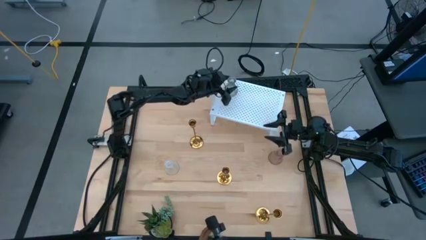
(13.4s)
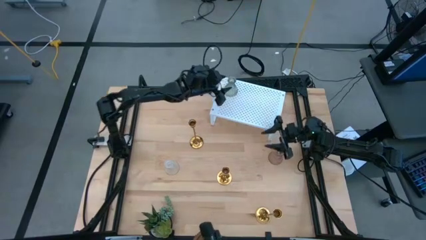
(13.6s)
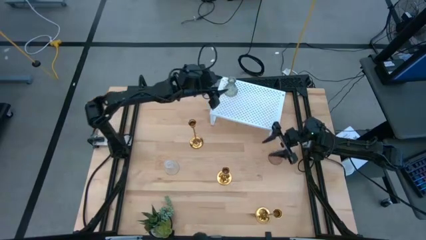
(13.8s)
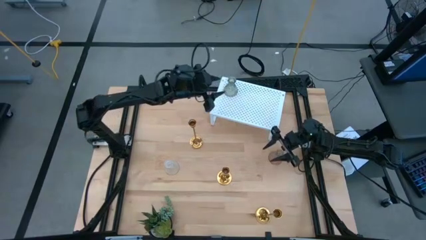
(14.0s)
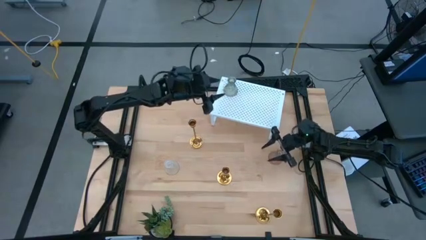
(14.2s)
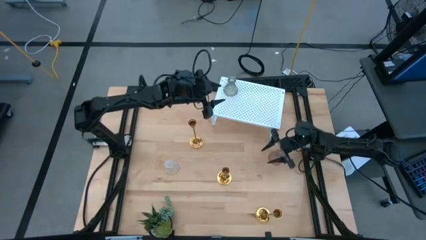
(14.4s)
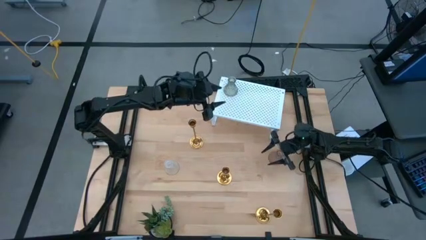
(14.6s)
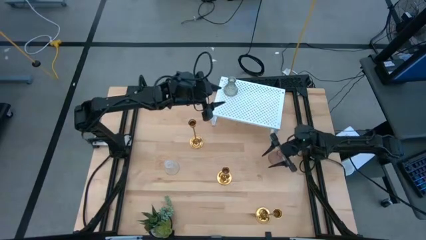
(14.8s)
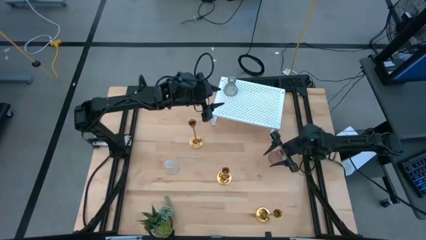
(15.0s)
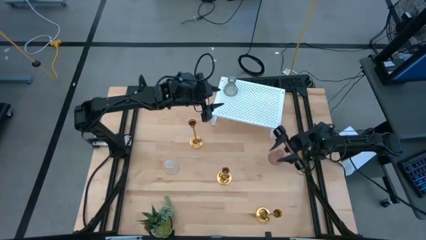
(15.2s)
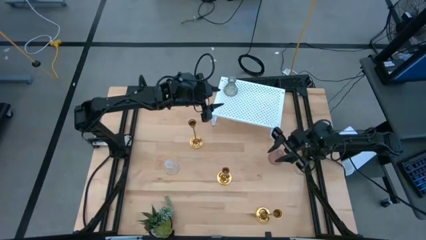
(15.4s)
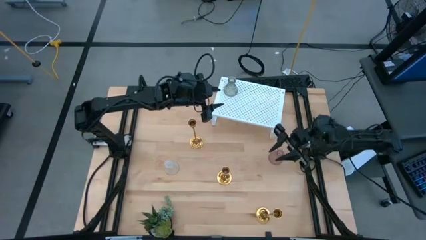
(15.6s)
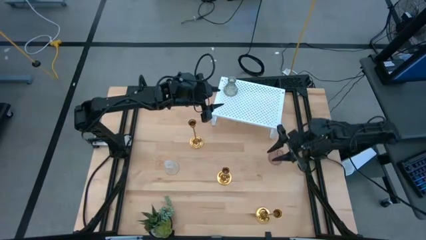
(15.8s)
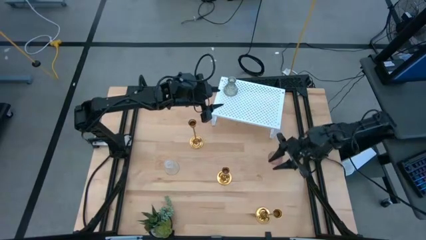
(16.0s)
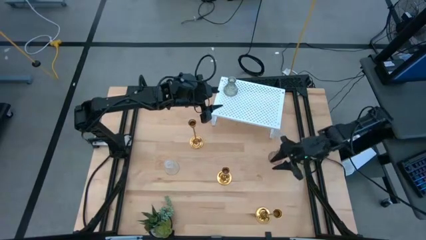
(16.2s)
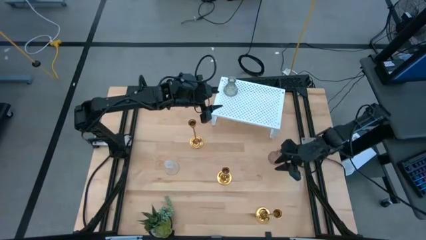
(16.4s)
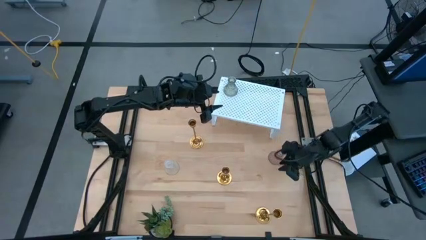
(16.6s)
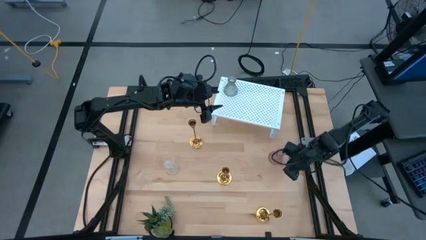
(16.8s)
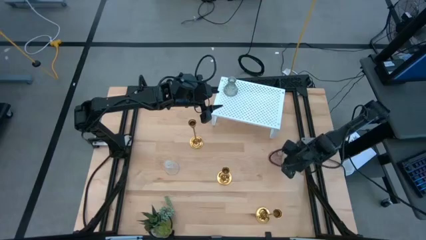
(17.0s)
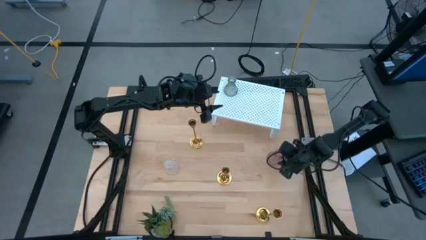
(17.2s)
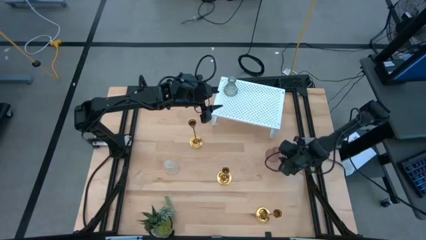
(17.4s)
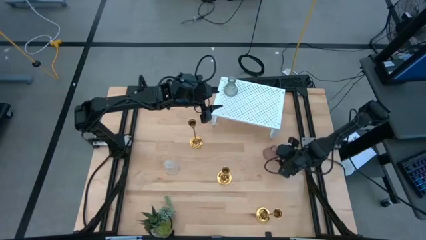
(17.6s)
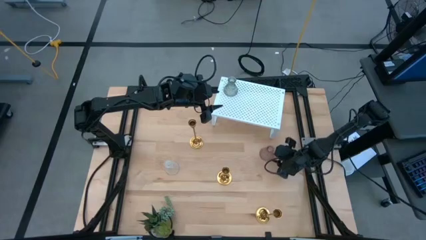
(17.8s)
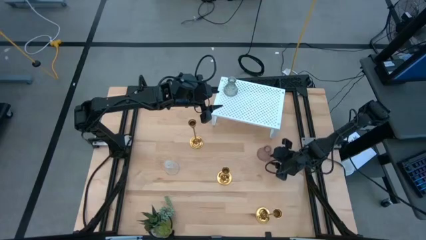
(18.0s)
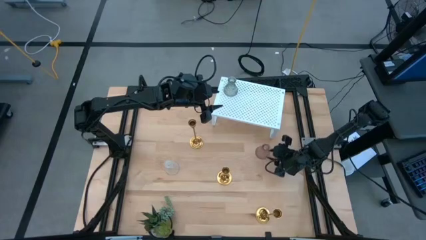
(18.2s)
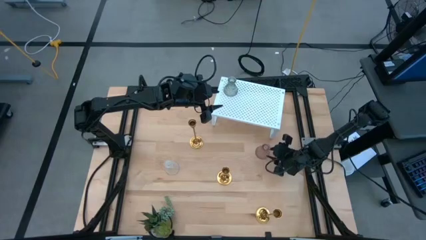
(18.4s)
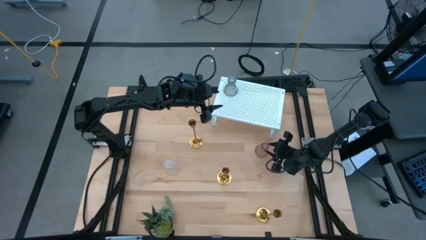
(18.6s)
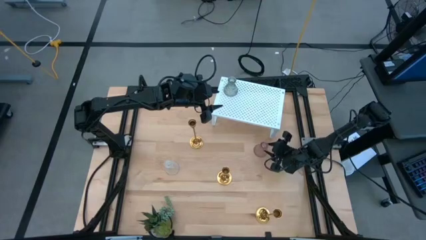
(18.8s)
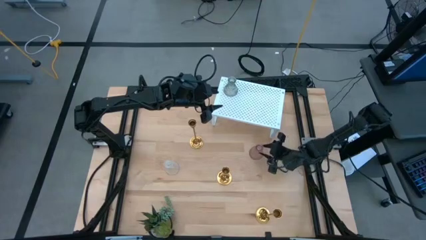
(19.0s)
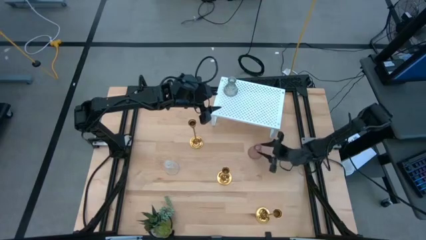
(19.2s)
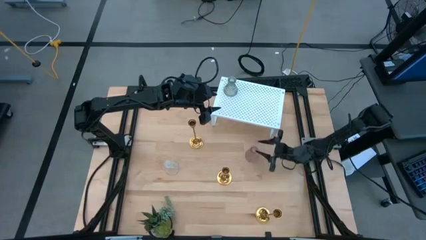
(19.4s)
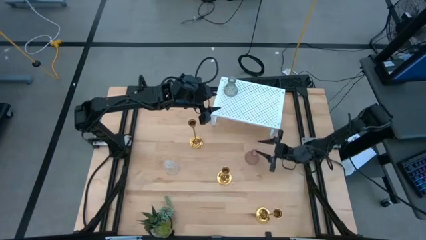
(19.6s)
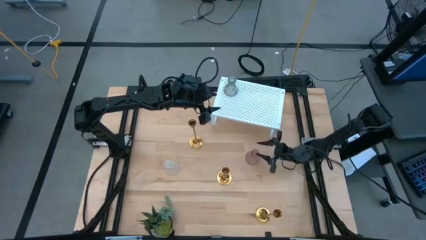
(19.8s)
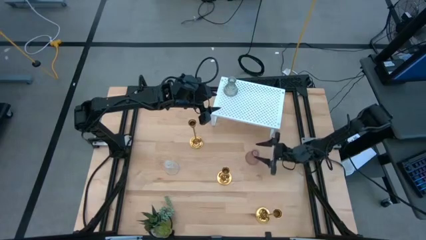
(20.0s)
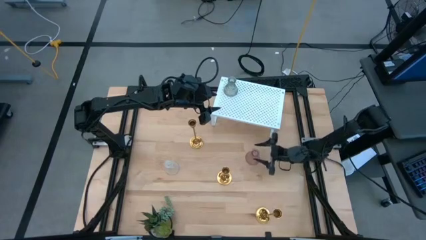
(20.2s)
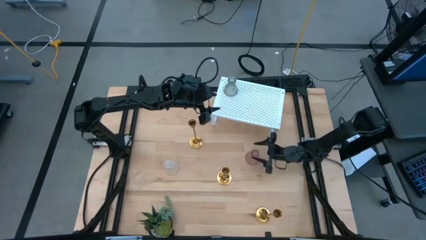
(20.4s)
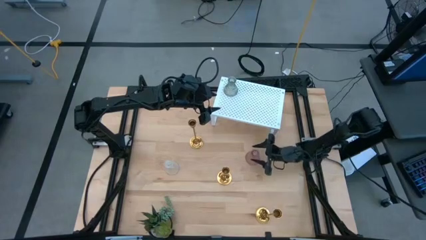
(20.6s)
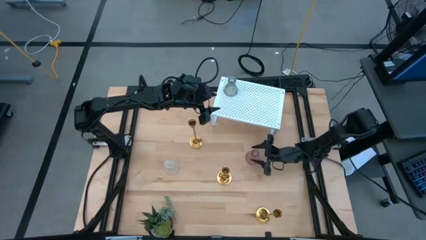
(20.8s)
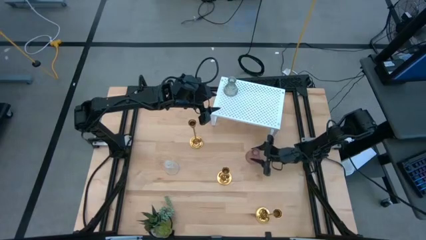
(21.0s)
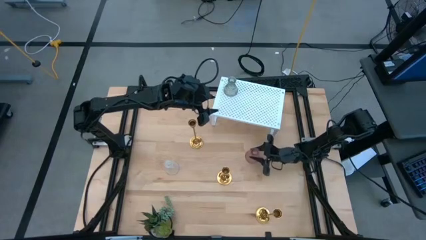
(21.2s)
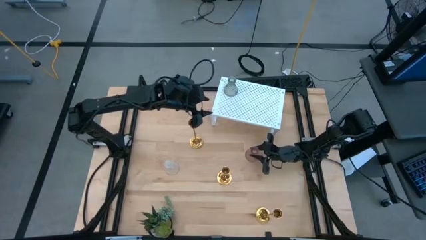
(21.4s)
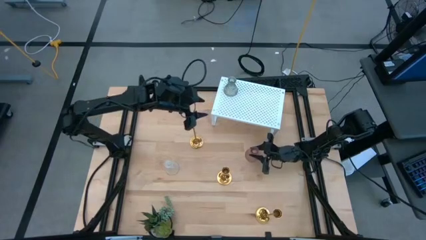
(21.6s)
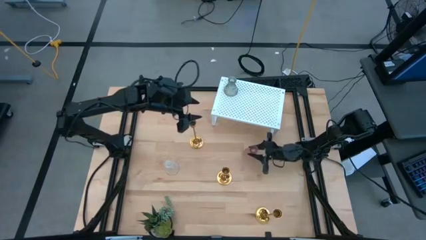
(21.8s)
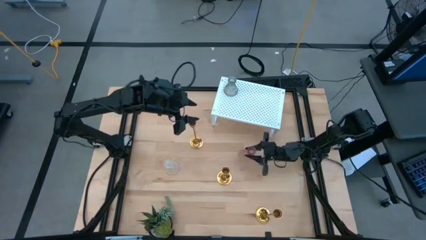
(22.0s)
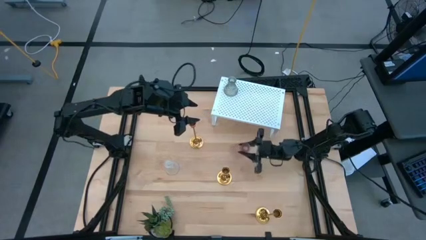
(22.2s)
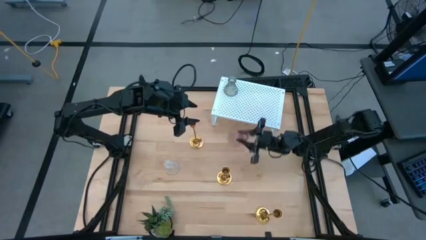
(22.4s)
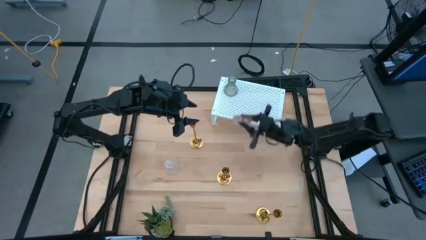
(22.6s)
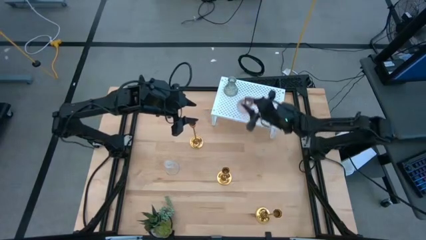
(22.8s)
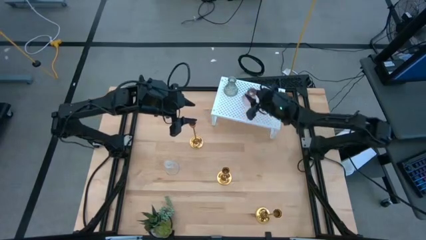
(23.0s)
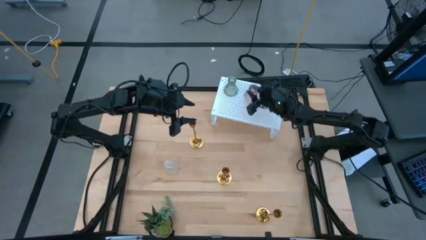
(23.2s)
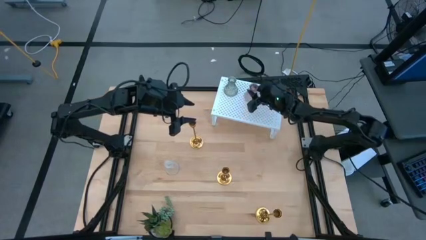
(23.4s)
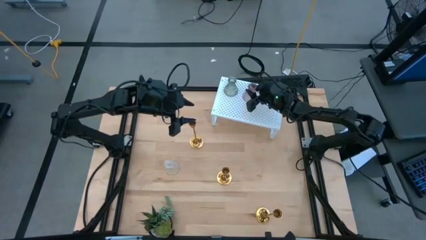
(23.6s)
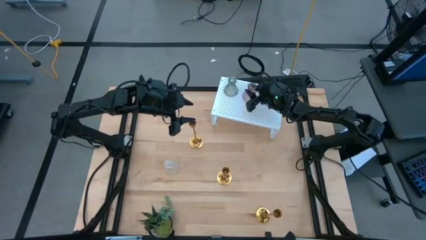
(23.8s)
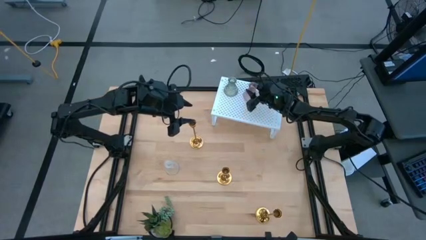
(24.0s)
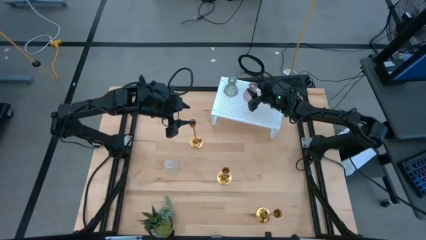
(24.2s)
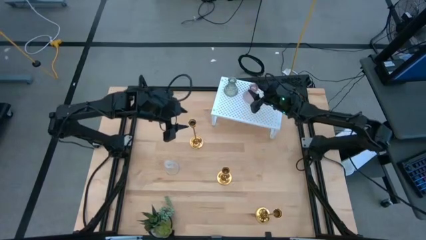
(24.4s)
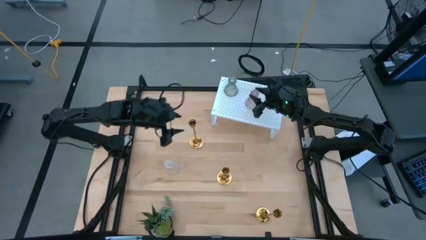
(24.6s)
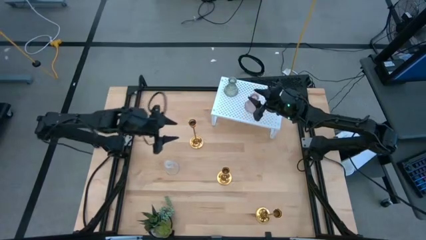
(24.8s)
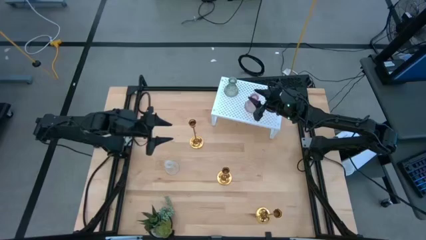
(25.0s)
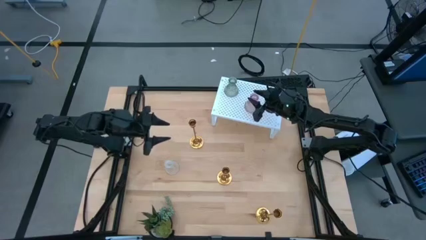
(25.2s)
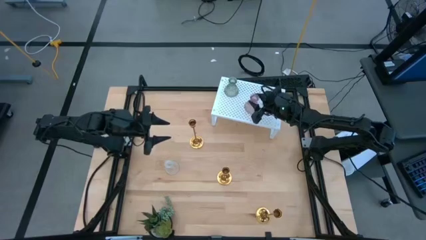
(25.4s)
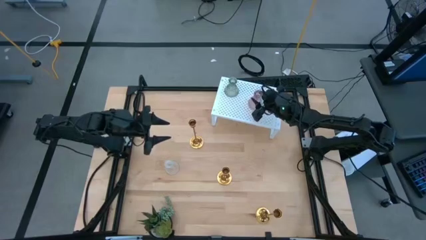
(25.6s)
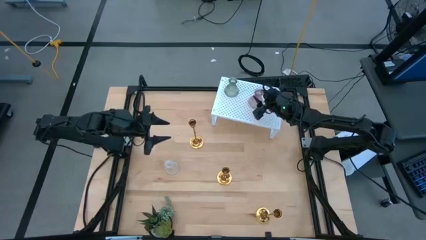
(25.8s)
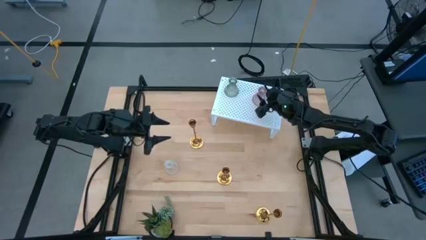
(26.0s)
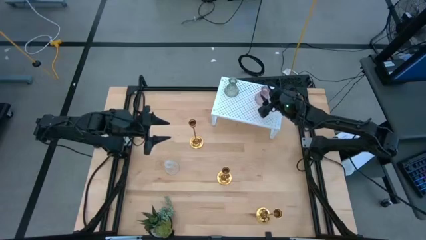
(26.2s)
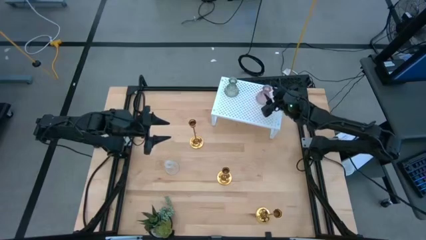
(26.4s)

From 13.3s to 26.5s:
Task: Pick & Place candle stick holders
Put the pink candle holder on the shelf
